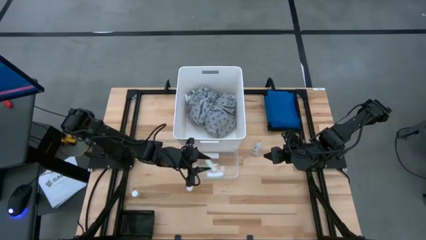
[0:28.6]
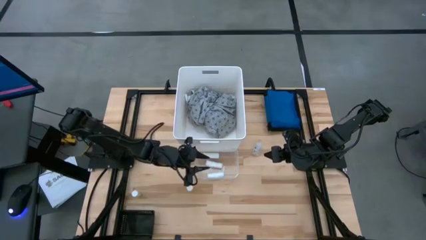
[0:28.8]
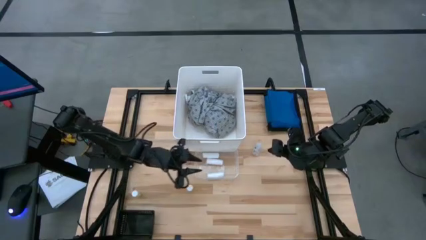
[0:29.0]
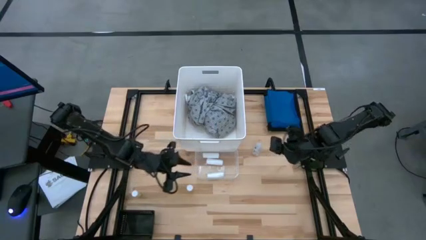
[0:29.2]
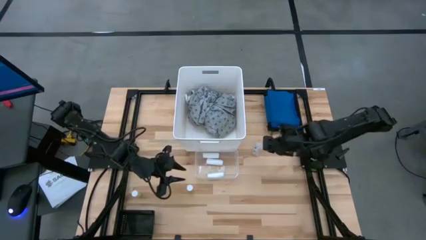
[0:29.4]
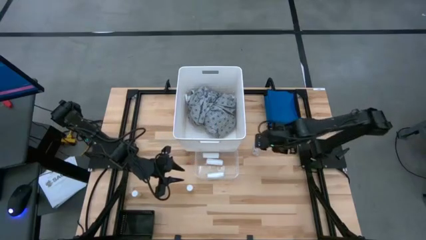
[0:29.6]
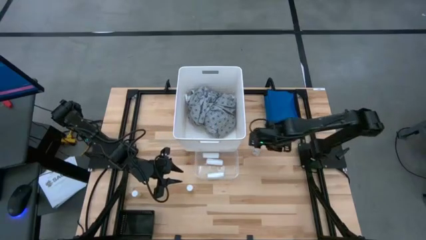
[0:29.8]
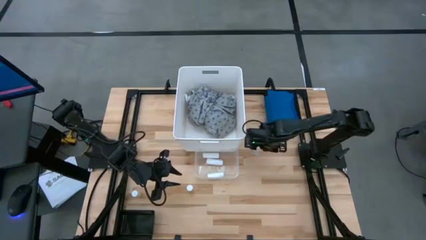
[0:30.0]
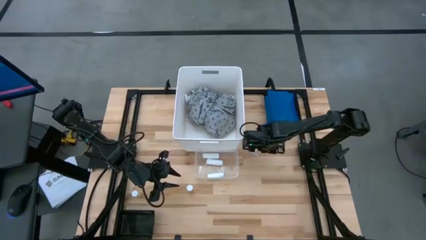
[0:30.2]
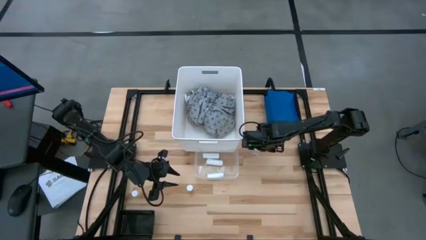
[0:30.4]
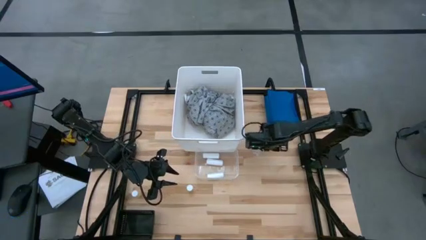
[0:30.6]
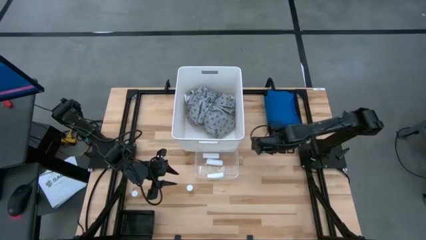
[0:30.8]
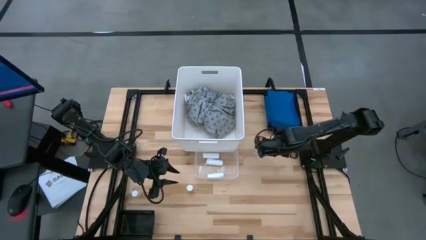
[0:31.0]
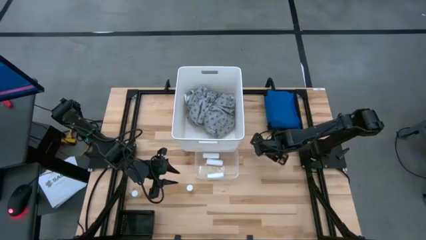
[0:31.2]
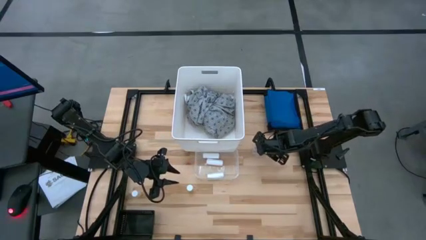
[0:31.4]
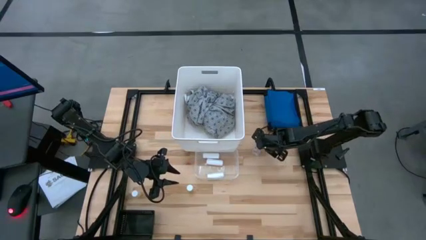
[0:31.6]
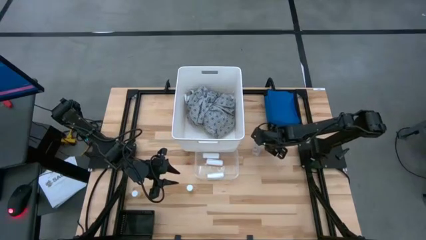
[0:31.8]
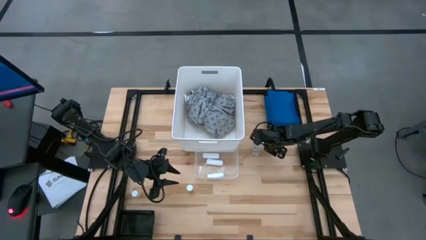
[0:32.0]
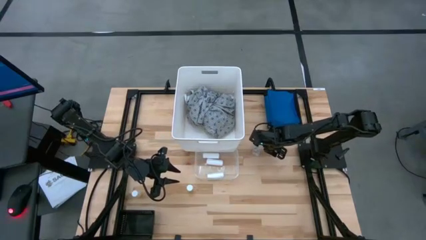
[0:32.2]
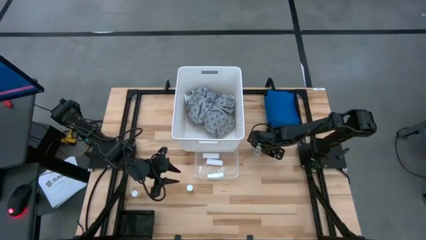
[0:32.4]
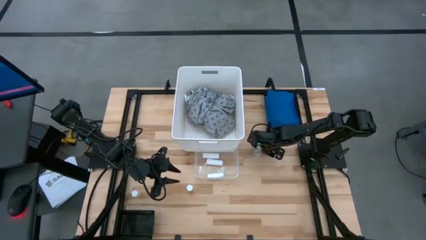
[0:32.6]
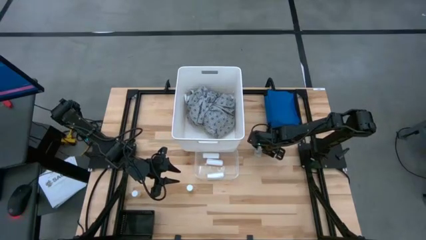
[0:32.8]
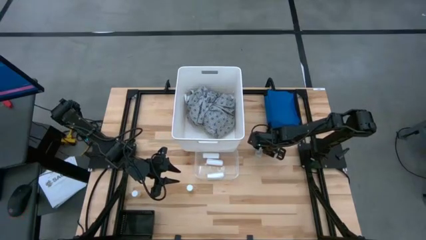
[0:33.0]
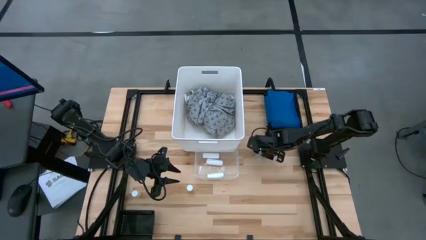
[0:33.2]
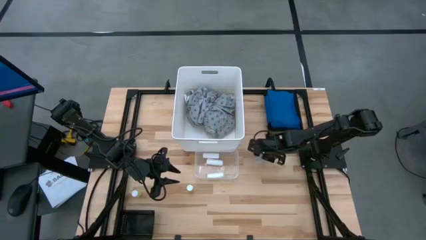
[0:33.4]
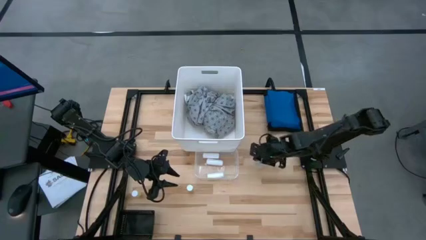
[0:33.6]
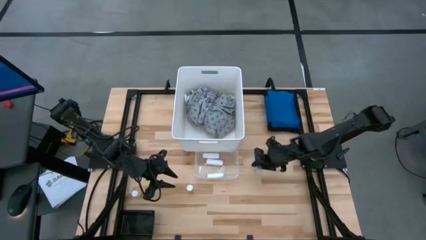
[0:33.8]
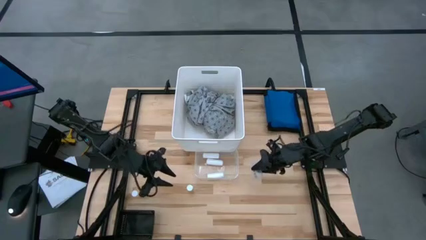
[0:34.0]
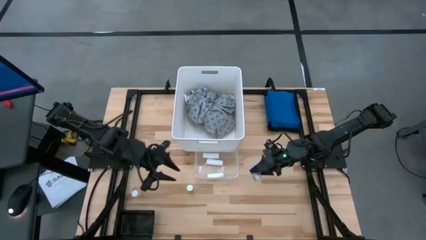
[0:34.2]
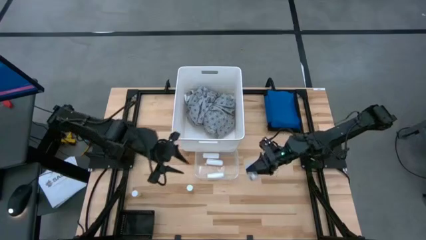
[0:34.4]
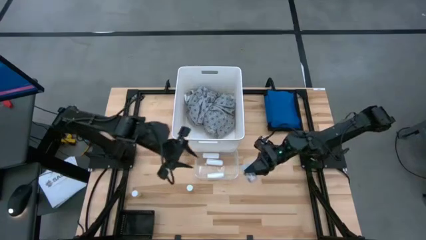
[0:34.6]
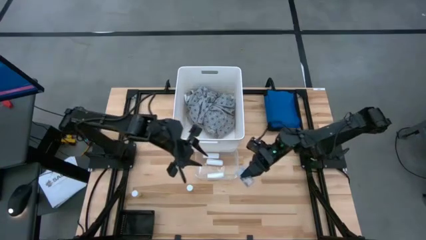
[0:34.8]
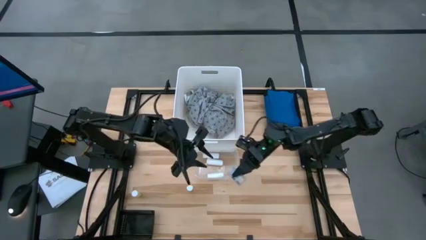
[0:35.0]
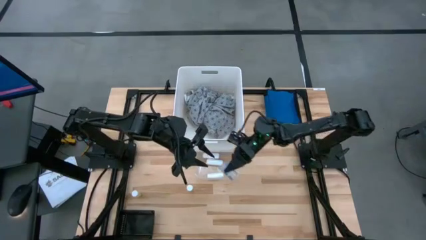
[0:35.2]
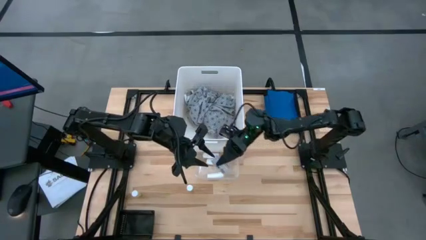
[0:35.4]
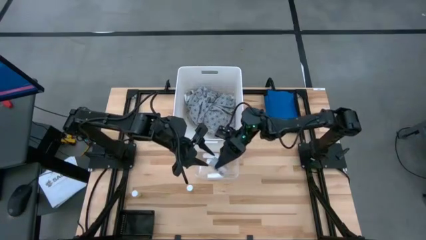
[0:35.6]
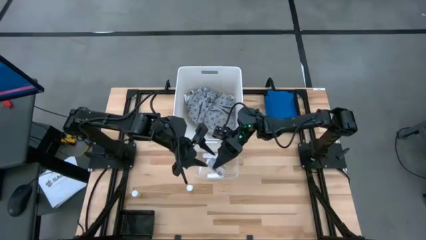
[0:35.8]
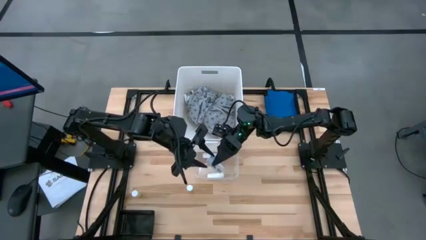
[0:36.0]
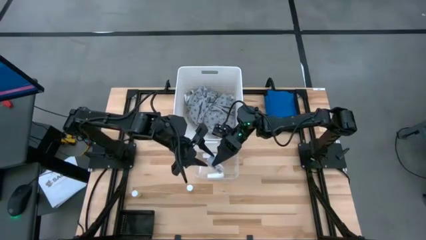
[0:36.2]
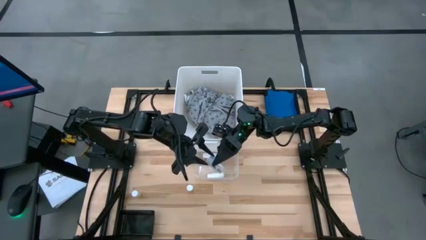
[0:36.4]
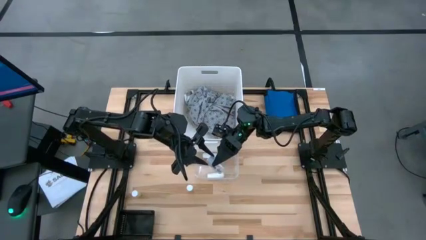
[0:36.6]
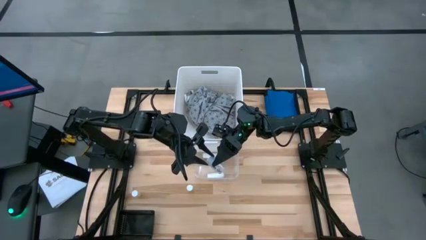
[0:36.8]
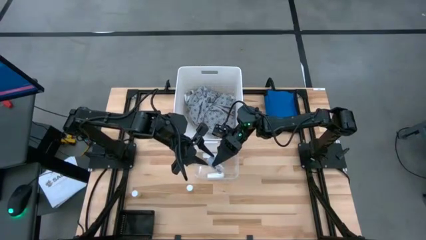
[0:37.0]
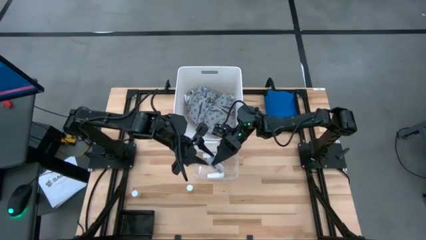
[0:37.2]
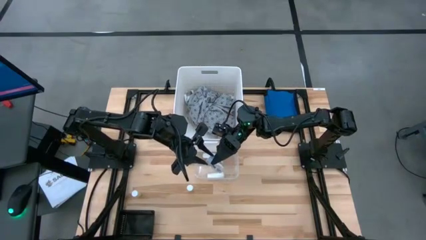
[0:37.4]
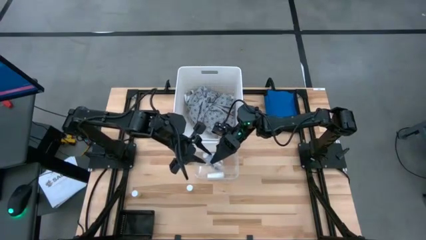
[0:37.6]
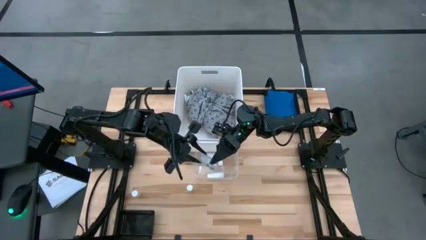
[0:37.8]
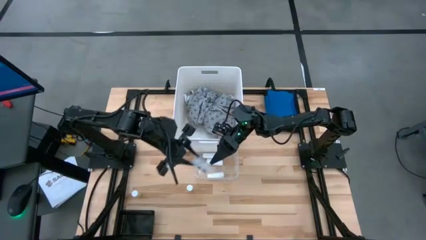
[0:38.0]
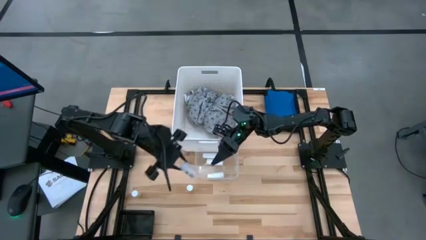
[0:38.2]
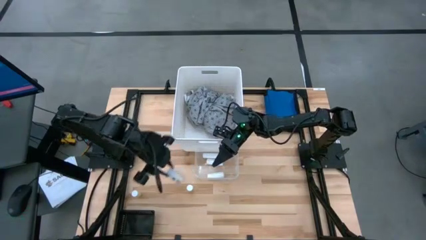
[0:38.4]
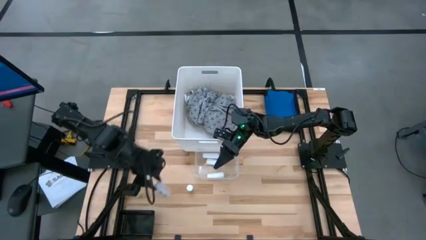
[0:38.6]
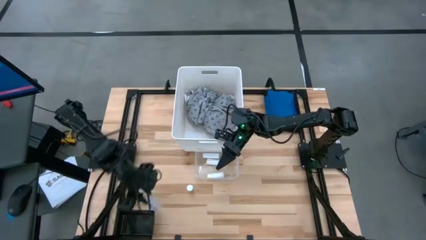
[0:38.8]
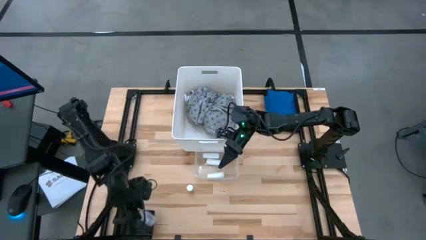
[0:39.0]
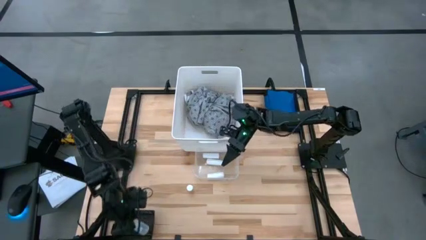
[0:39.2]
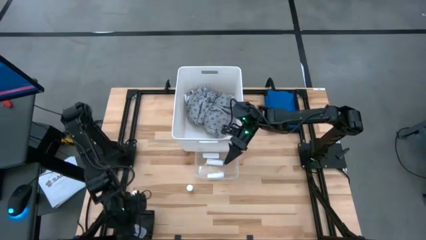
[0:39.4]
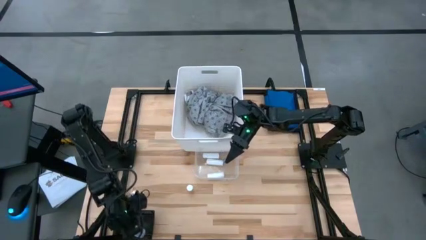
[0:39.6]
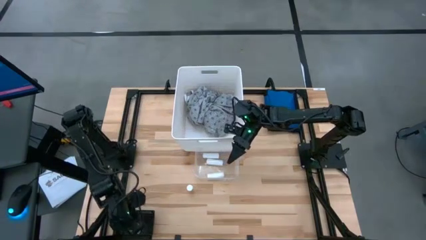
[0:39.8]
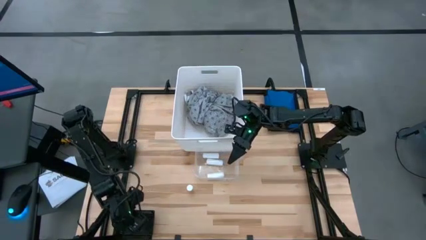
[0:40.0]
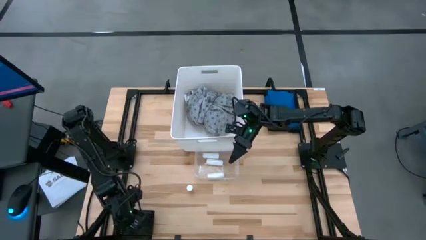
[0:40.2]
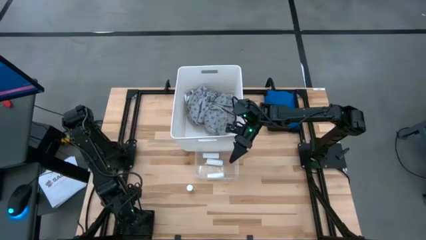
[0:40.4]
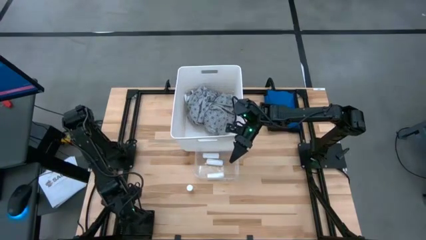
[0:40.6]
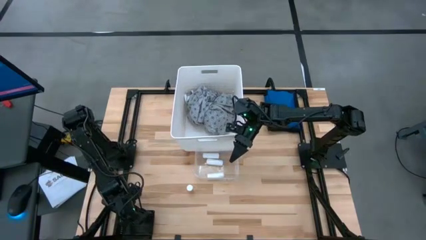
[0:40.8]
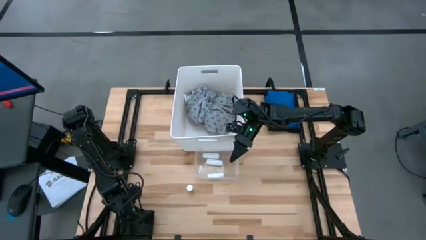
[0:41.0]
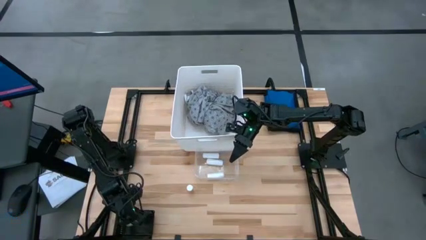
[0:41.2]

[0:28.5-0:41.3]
Task: Pick & Place Medicine items
Put the transparent pill bottle into the black bin

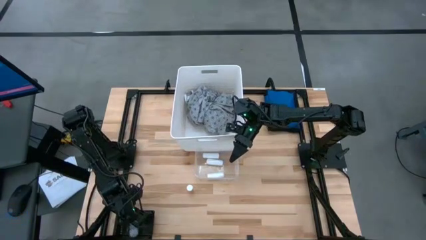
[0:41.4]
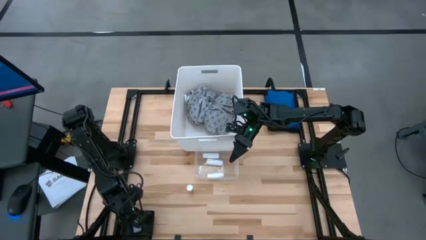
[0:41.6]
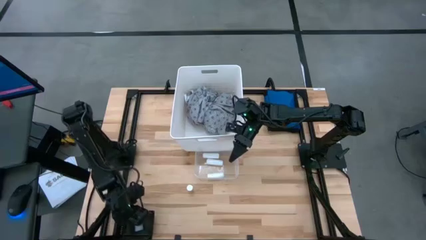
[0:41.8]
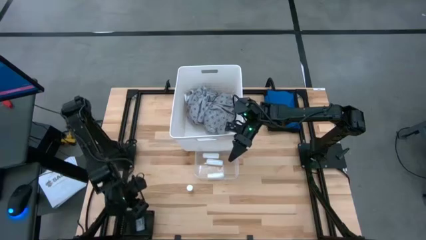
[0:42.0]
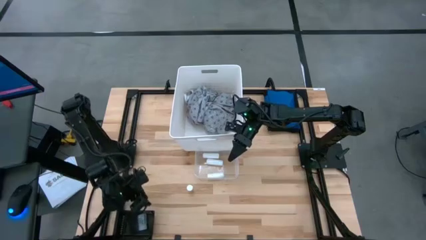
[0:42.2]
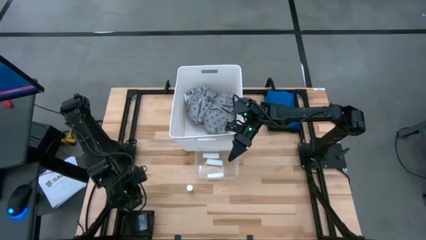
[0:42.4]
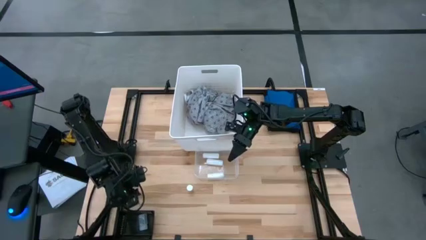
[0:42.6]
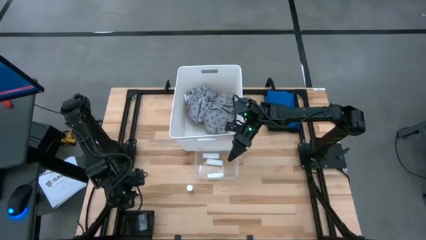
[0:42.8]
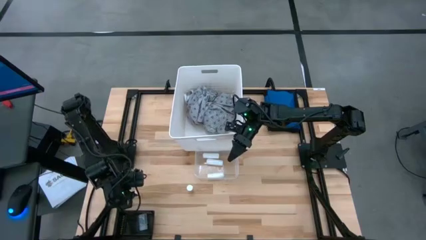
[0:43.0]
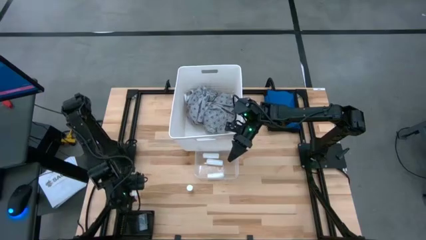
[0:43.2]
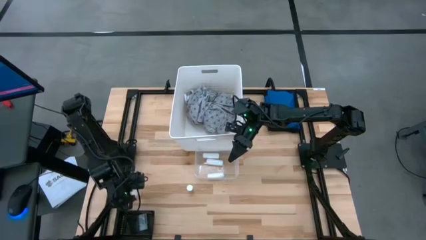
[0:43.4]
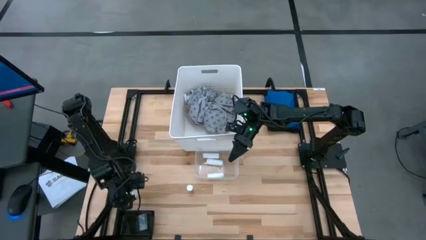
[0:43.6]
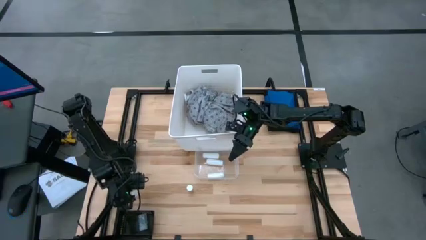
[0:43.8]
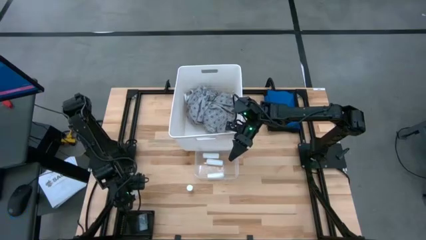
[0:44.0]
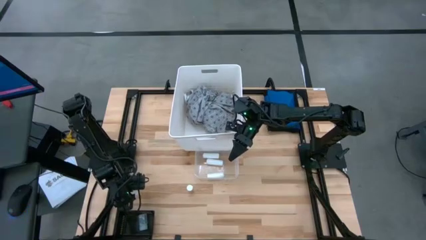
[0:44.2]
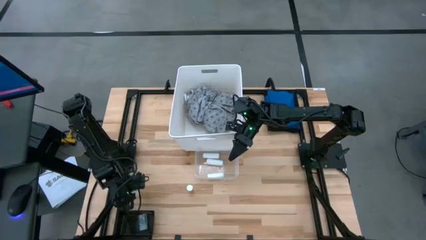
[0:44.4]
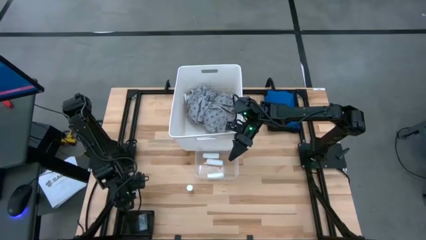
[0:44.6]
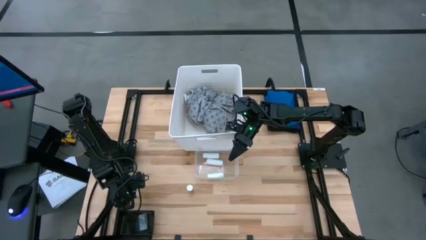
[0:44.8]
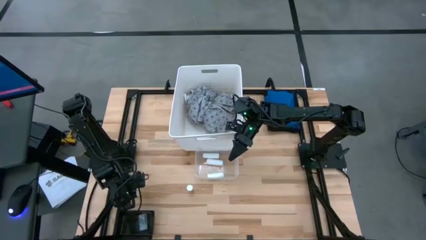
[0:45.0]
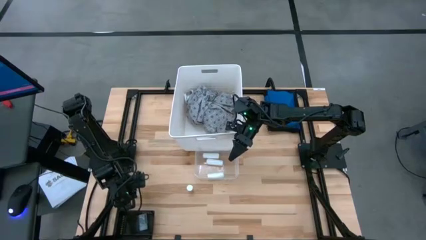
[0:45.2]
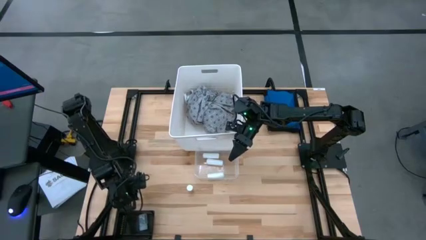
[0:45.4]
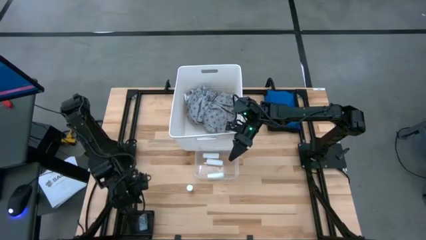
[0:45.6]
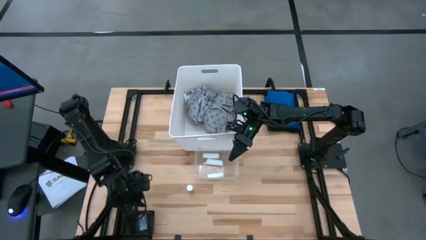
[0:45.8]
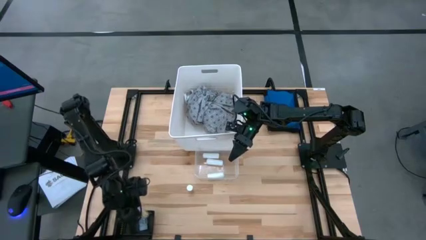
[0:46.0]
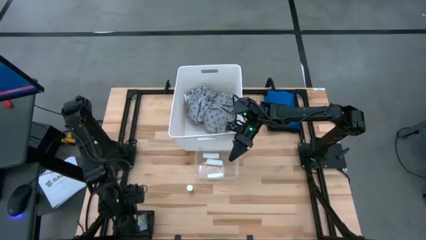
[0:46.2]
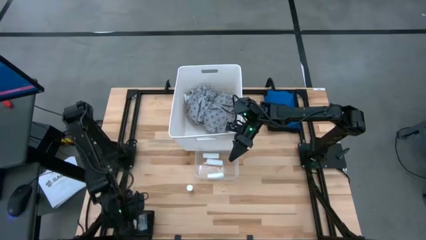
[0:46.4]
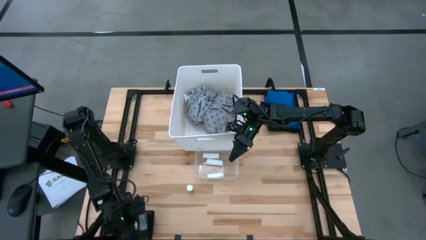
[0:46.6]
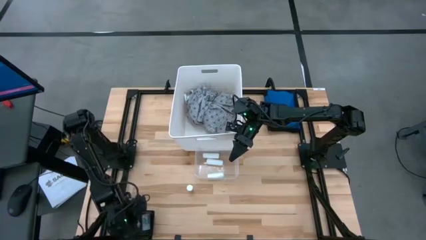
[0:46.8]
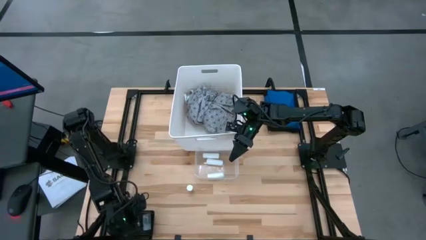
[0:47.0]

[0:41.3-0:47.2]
Put the left yellow pill bottle into the black bin
